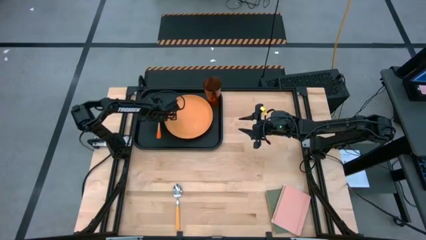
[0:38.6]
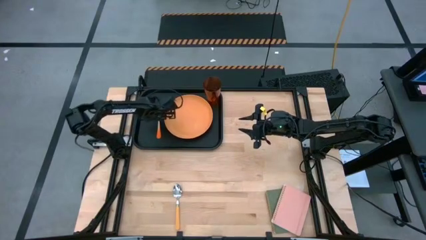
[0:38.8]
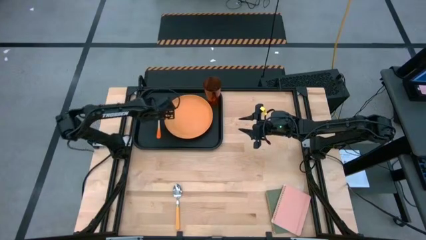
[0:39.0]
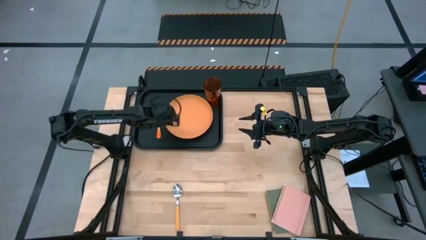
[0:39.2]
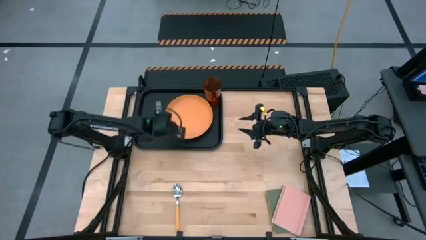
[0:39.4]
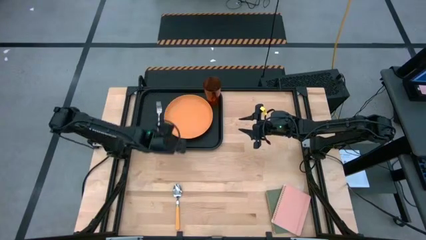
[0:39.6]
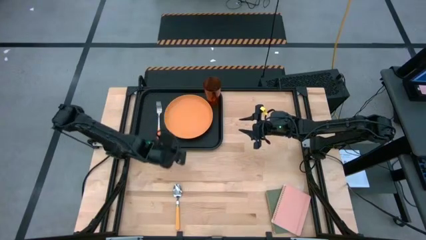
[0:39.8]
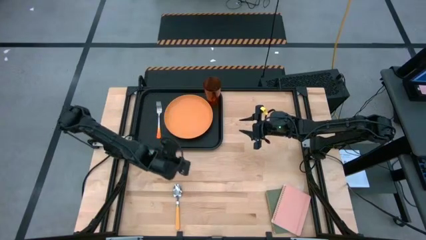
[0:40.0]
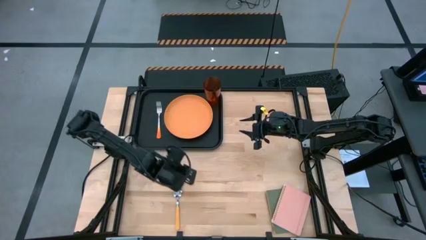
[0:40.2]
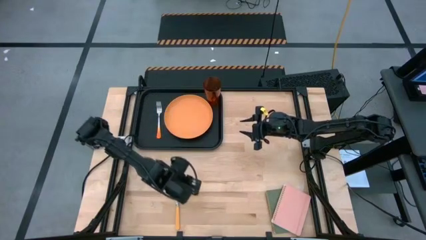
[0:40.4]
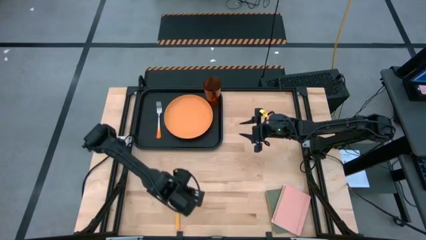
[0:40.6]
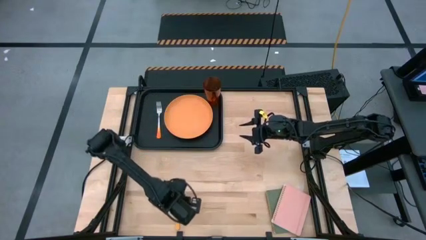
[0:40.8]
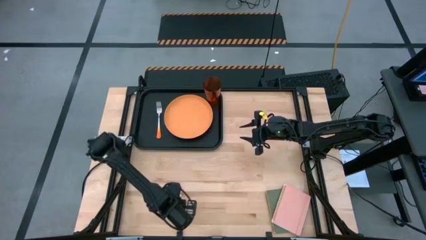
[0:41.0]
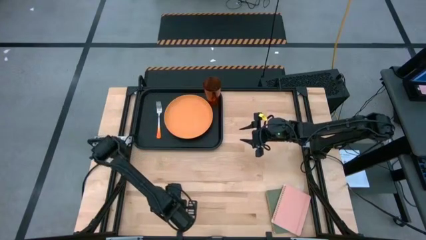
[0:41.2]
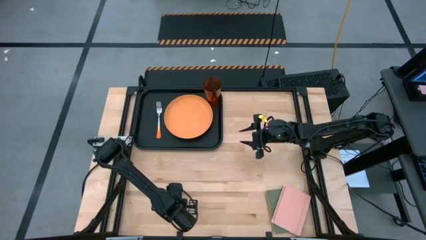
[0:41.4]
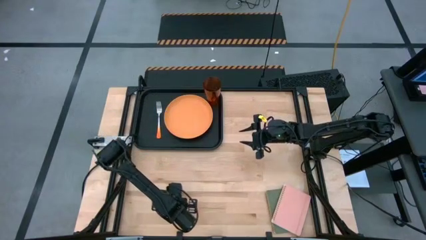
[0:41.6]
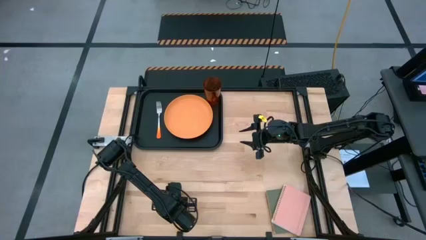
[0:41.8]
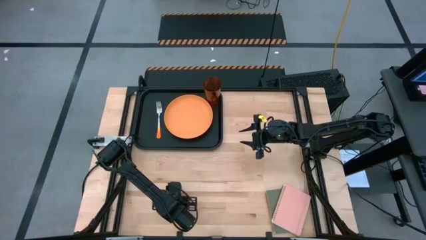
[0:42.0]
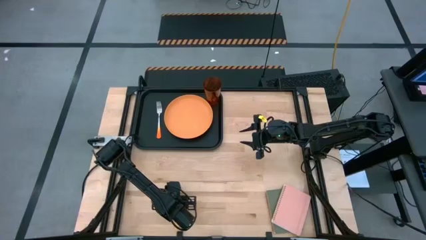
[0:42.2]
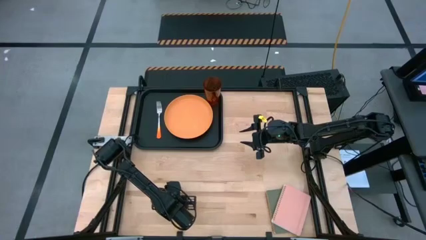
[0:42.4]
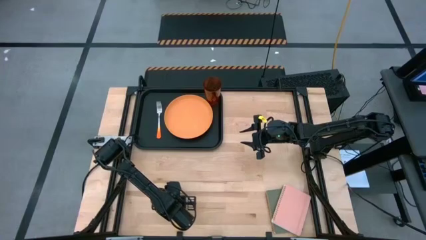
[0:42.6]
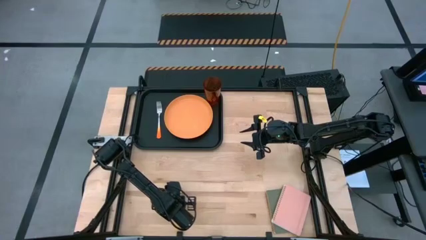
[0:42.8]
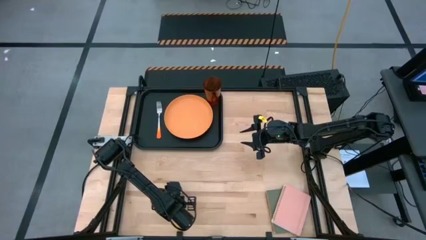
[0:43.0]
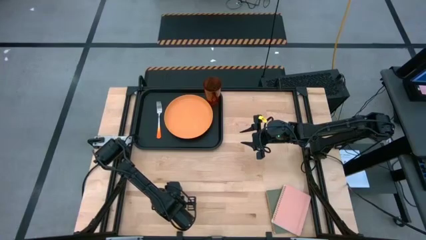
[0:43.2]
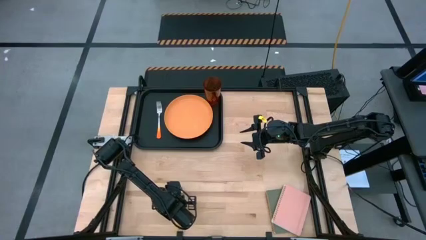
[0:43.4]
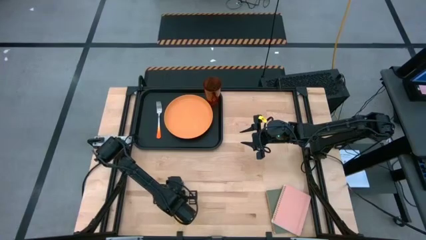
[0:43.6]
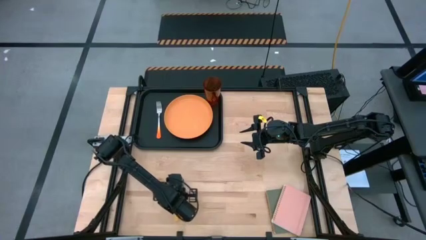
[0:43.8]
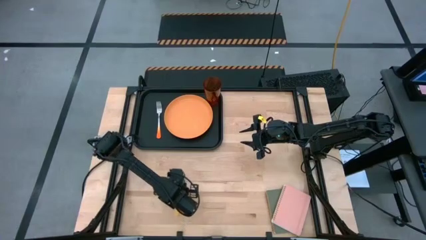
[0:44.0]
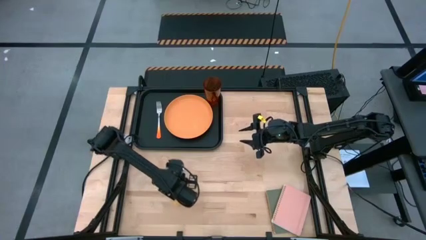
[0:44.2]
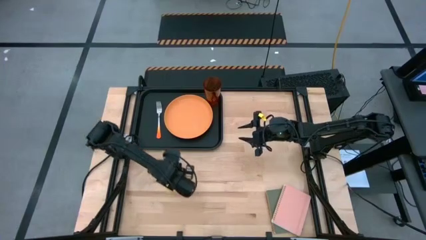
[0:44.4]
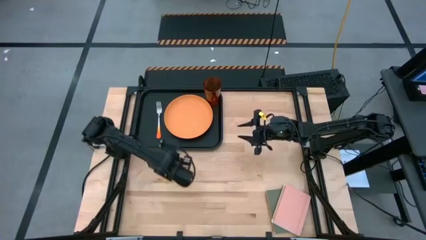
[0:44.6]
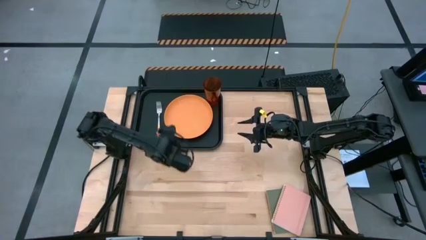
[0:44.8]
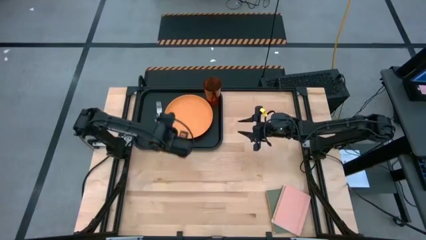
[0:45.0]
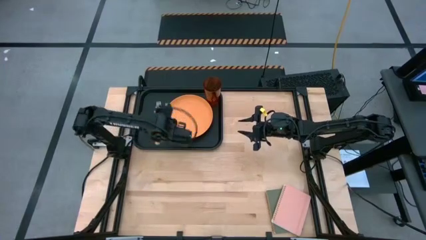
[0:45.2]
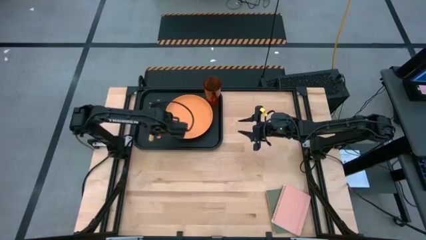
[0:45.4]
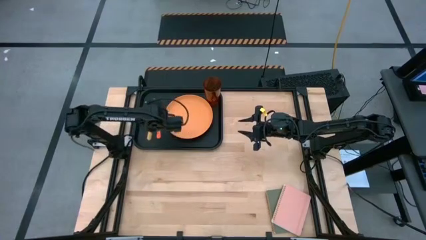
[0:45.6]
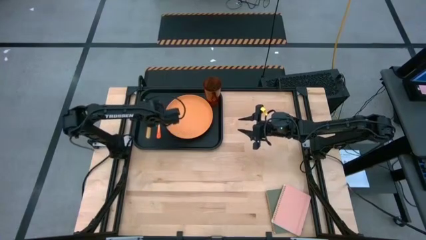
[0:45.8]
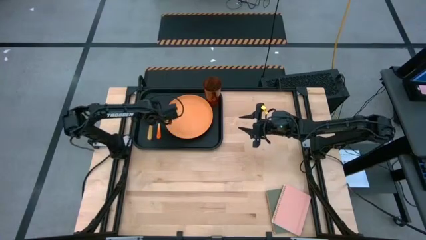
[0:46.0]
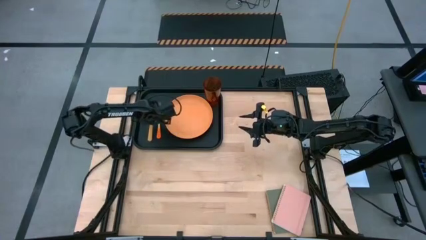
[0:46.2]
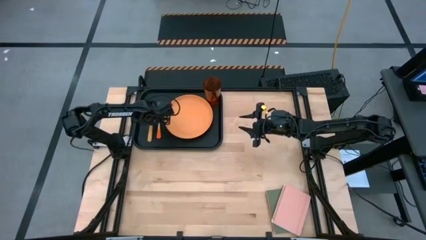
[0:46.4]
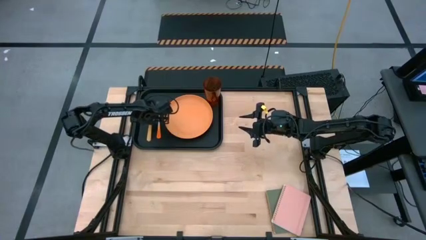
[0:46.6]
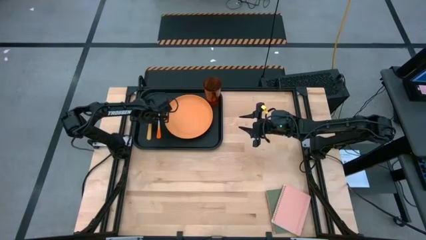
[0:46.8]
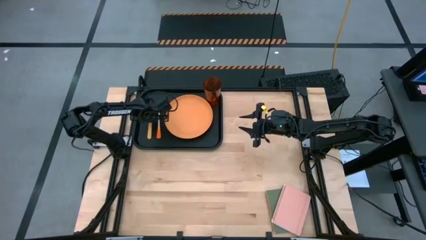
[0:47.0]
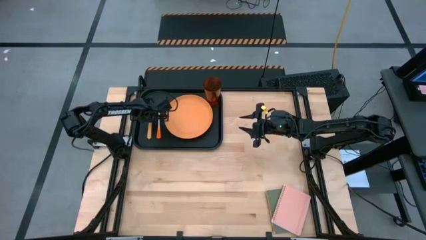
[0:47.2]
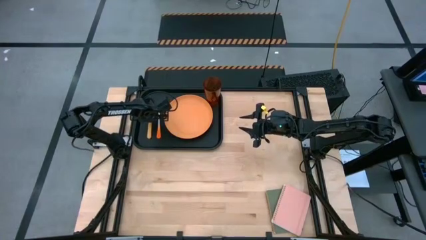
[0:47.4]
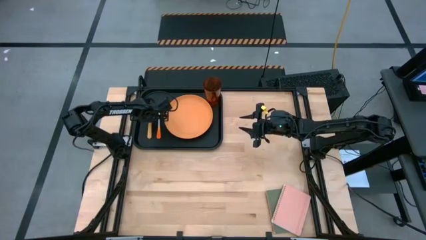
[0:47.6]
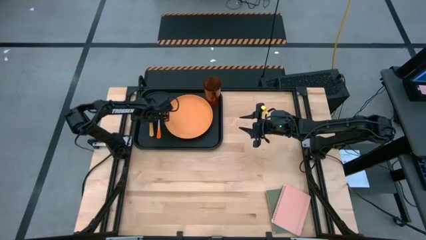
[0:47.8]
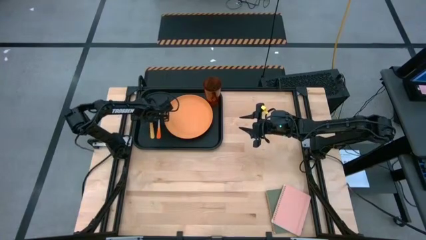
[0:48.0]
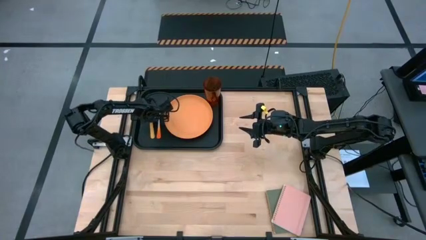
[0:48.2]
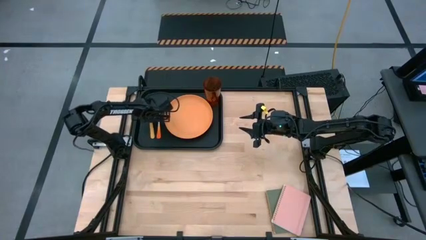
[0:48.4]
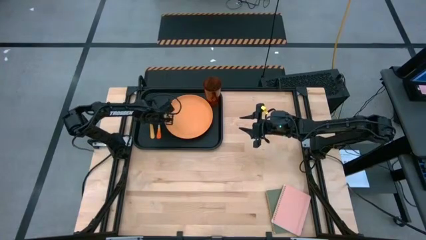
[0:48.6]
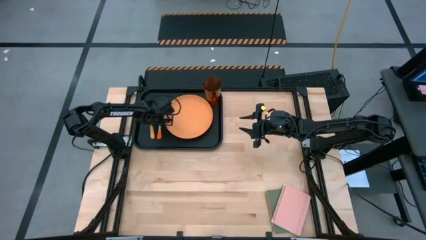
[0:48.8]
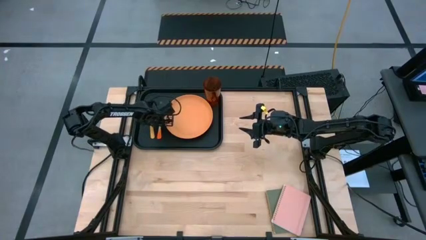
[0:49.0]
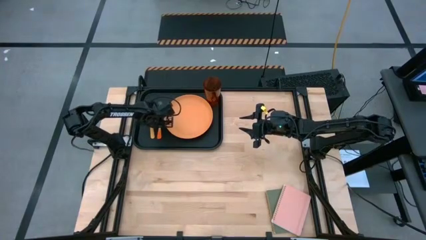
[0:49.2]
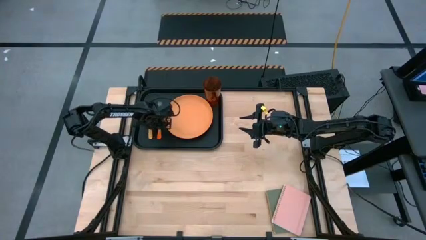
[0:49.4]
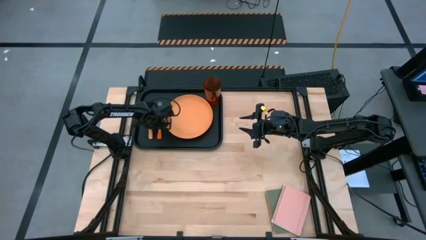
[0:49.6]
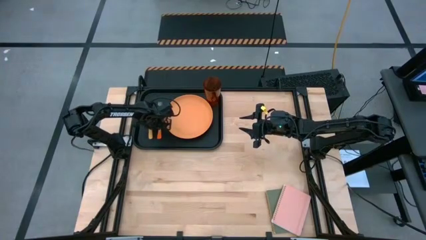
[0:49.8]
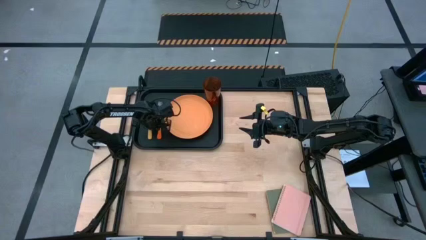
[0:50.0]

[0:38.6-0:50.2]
Task: Pick and place plate/cup/fork/spoon on tray
Put the yellow spoon on the black serving tray to the left of the orange fork
